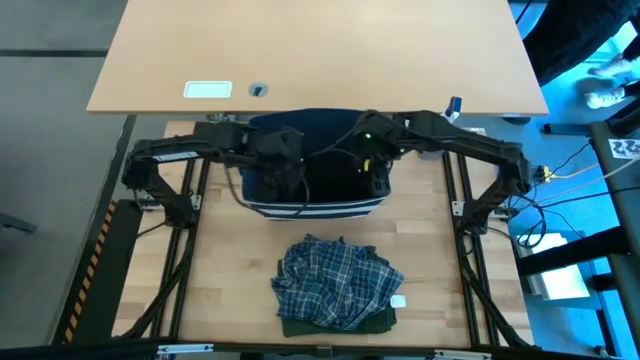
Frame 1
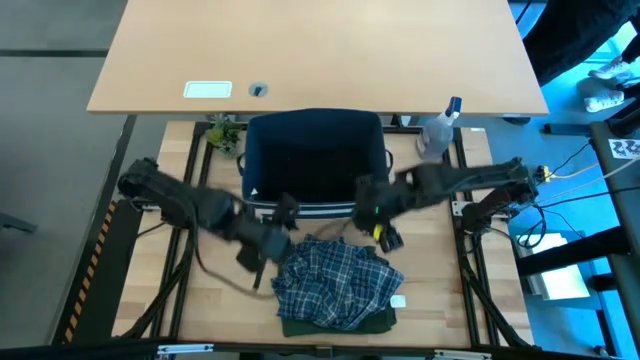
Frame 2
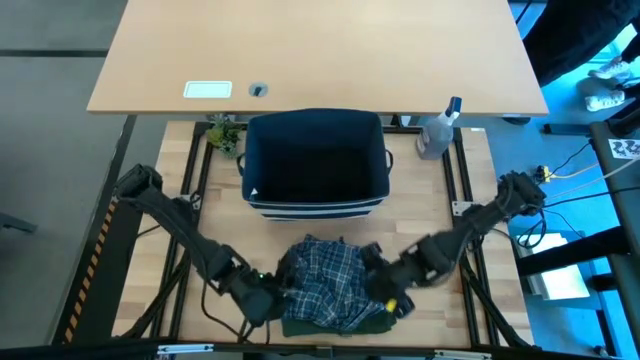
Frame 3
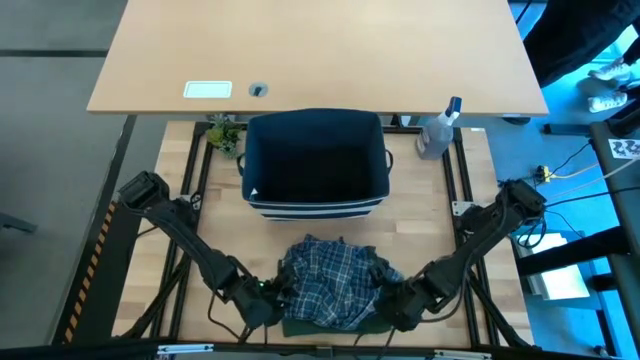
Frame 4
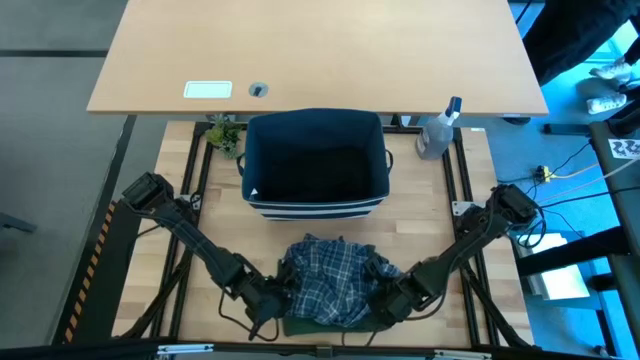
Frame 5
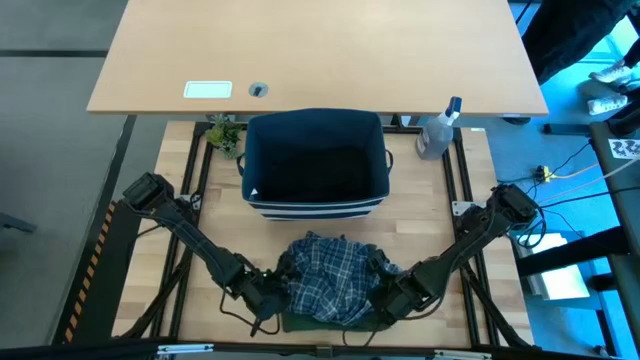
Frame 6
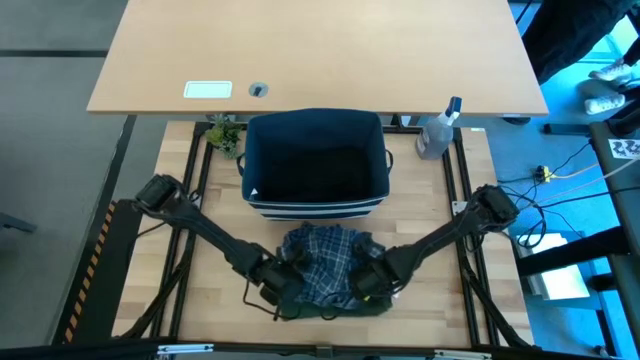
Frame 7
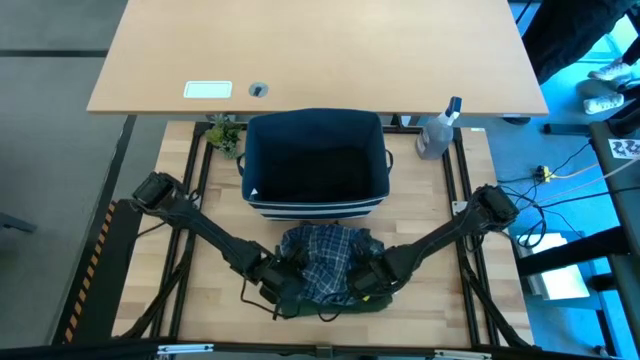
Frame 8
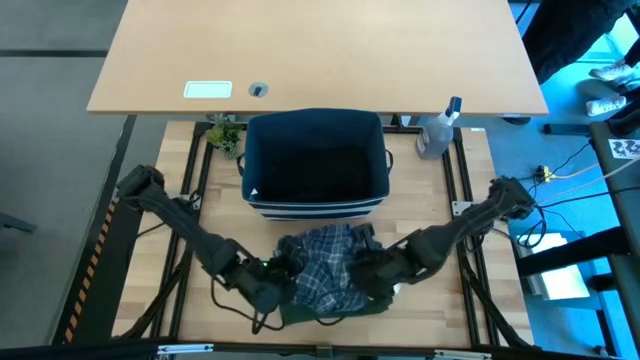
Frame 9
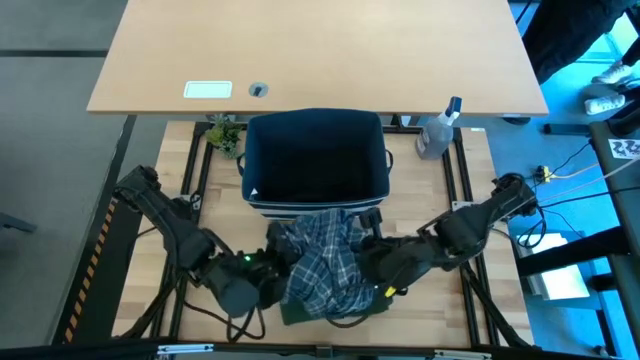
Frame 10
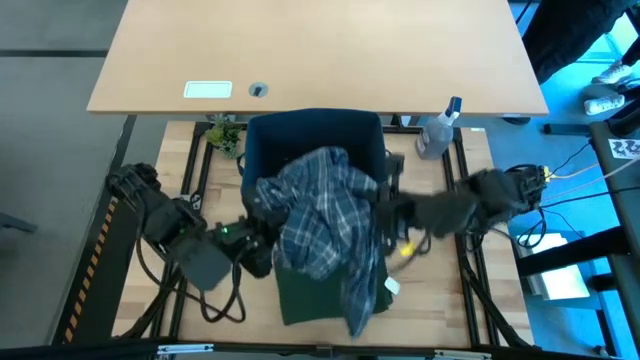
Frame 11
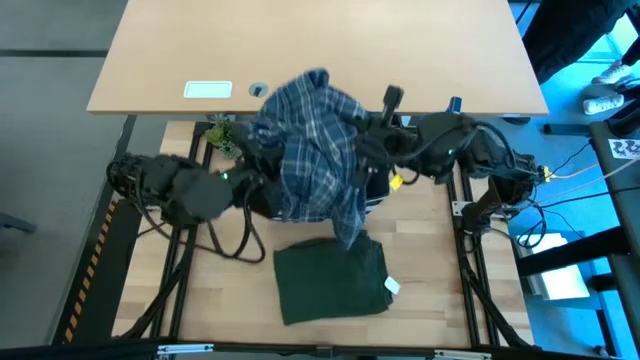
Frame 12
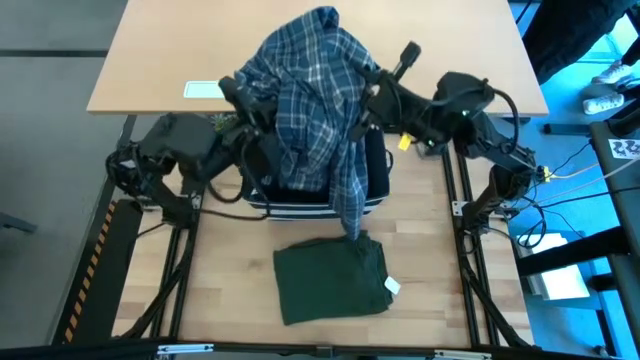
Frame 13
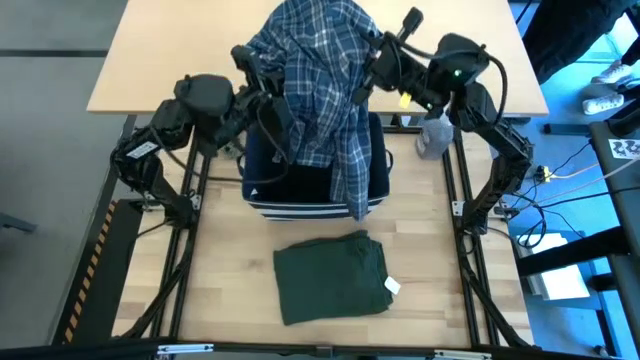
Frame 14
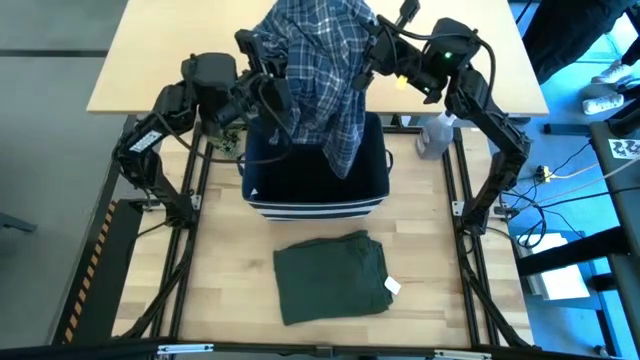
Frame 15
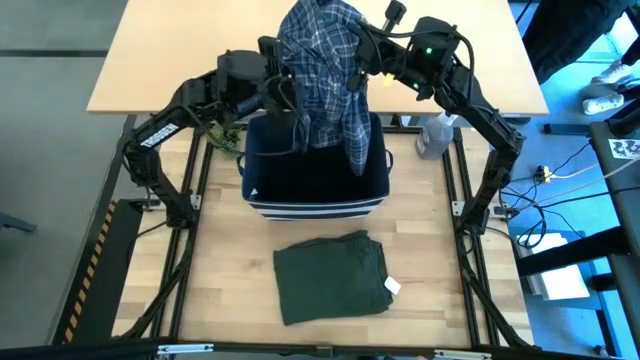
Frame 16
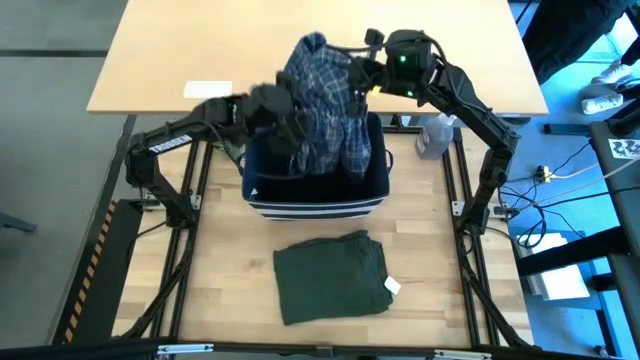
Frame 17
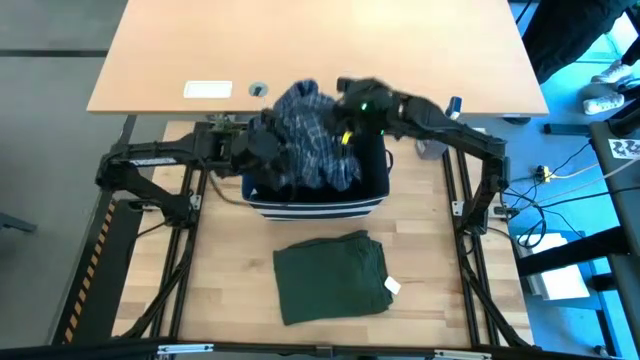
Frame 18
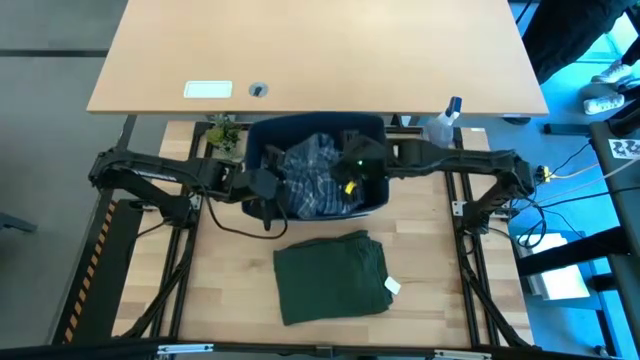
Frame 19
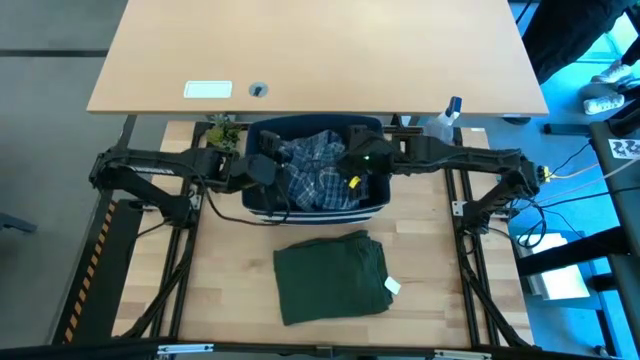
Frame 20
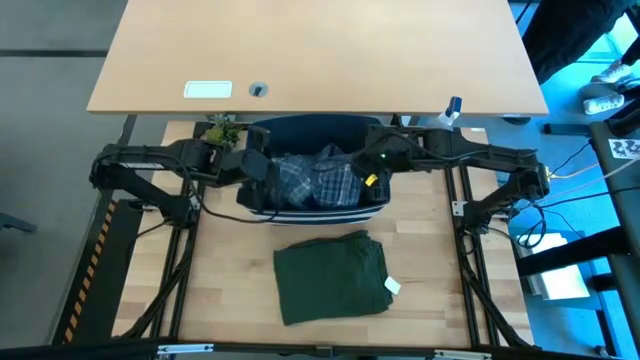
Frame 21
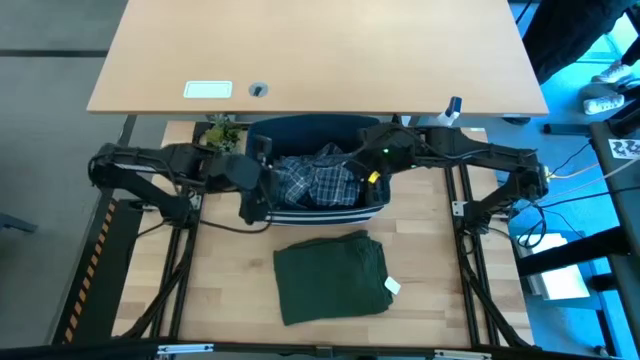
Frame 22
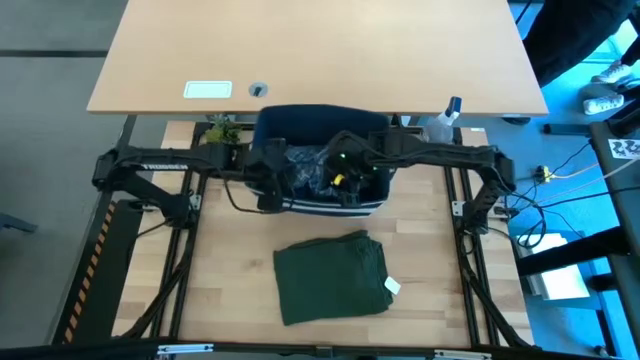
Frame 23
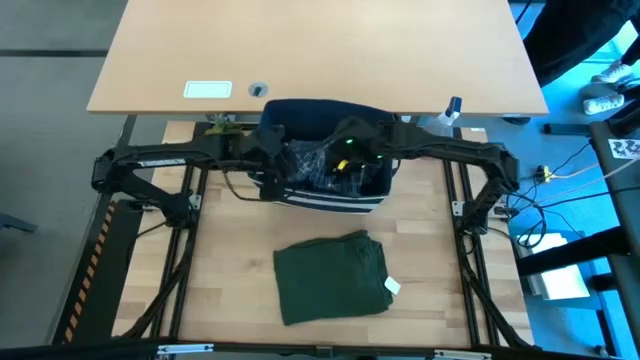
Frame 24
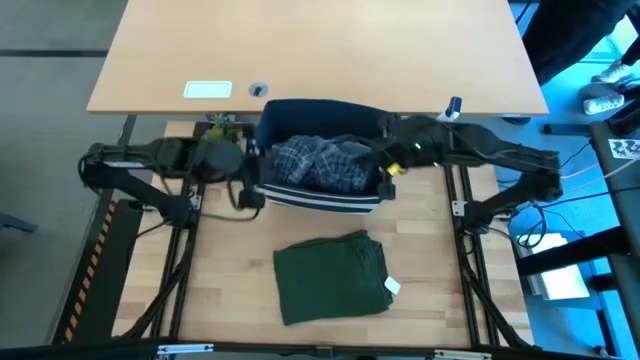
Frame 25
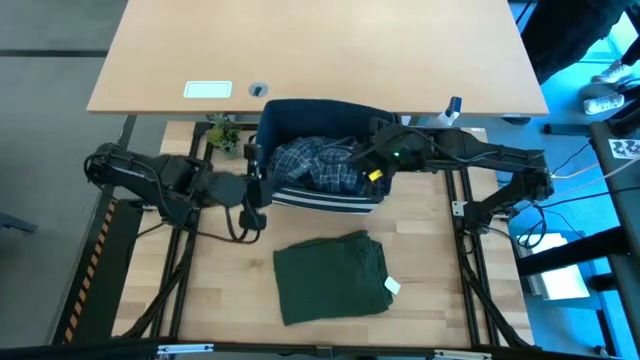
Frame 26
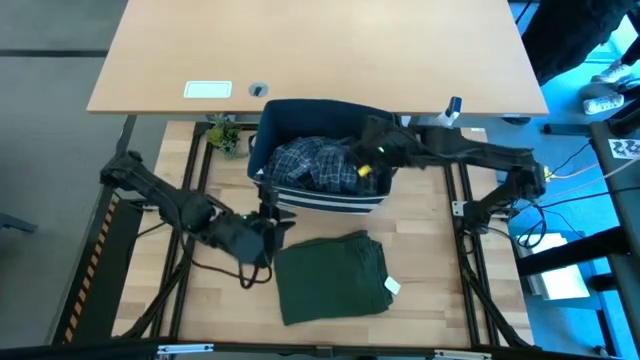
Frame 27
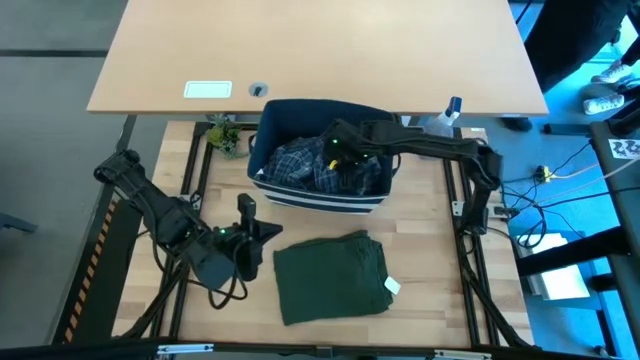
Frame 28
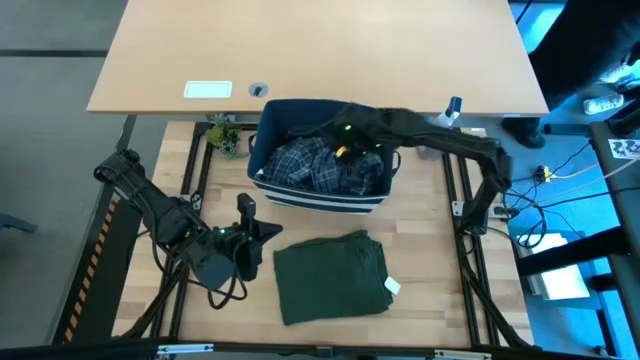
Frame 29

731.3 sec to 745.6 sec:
Task: Fold Laundry from Bin
Put the blue checkered pants into the laundry bin

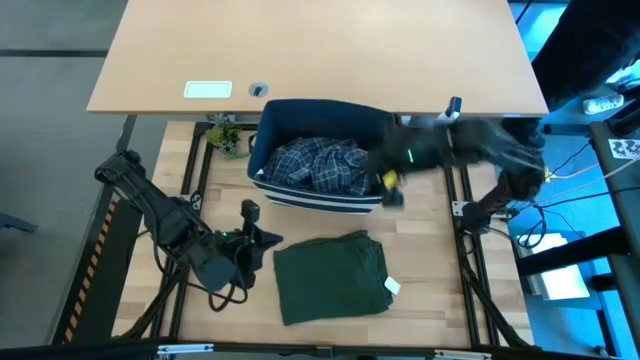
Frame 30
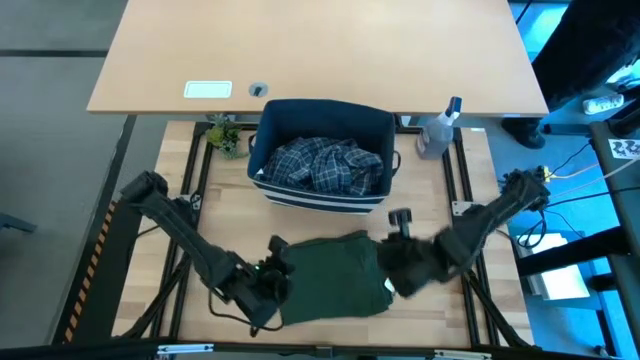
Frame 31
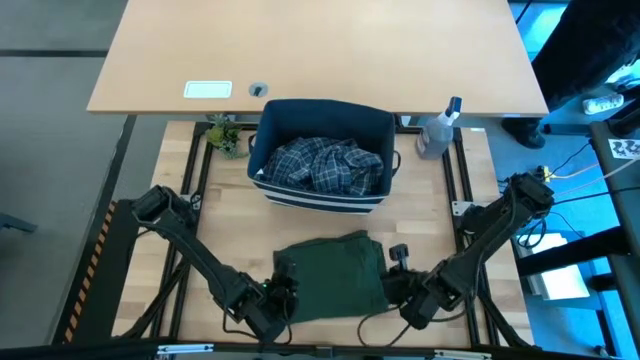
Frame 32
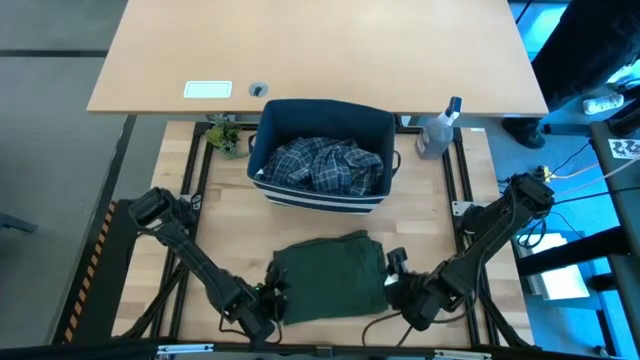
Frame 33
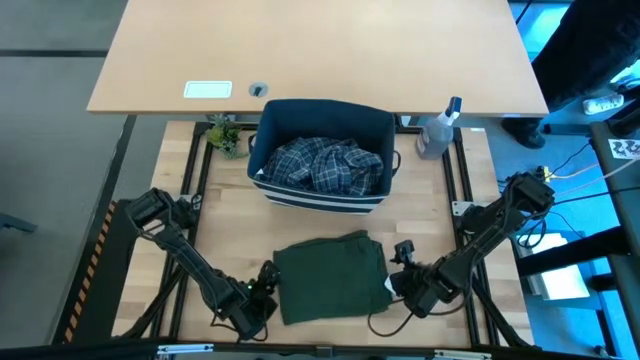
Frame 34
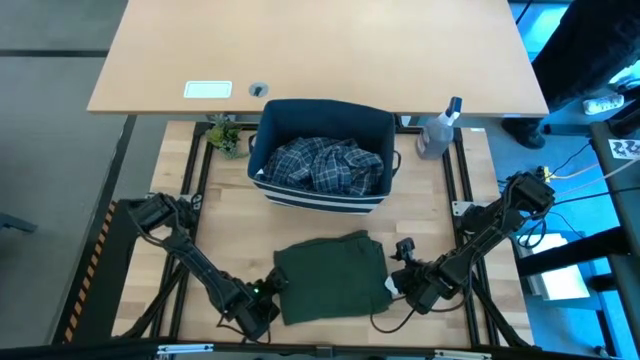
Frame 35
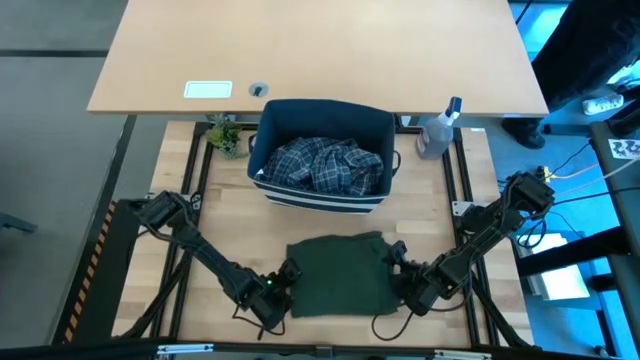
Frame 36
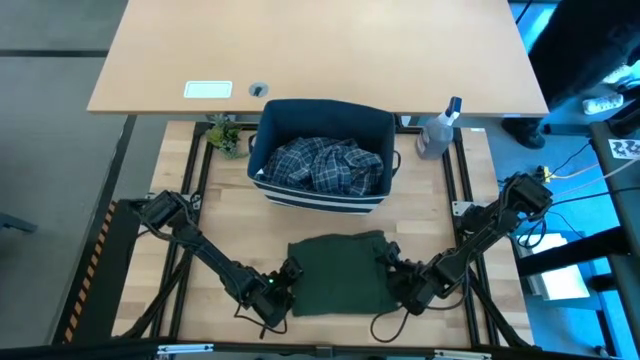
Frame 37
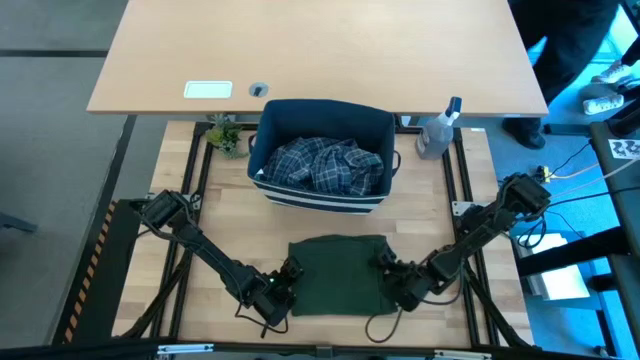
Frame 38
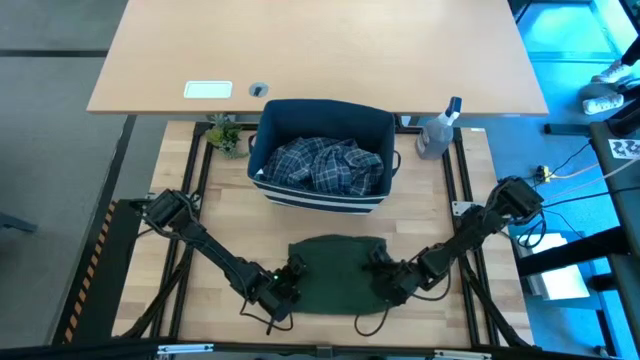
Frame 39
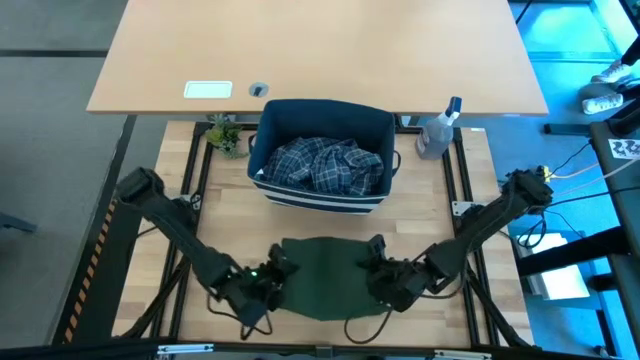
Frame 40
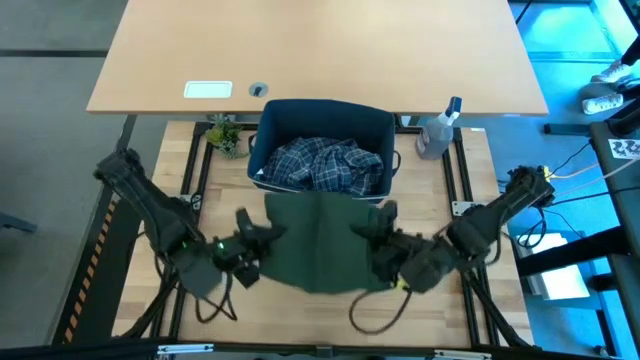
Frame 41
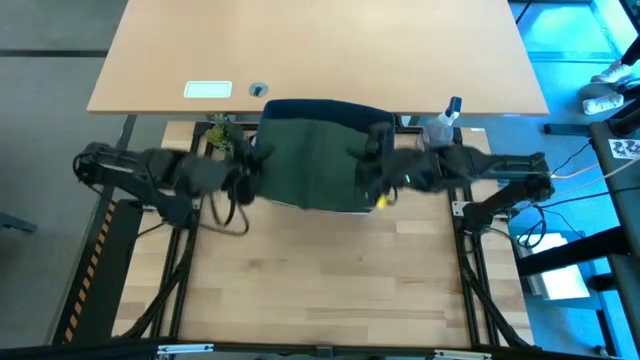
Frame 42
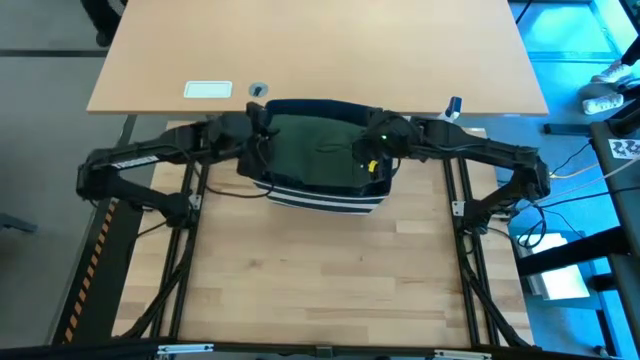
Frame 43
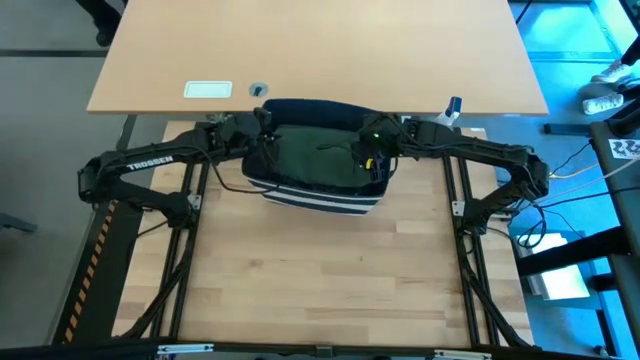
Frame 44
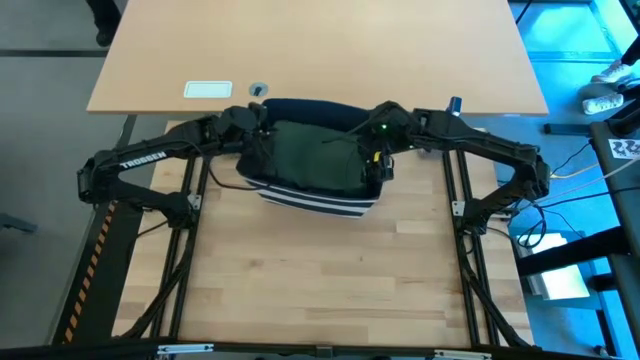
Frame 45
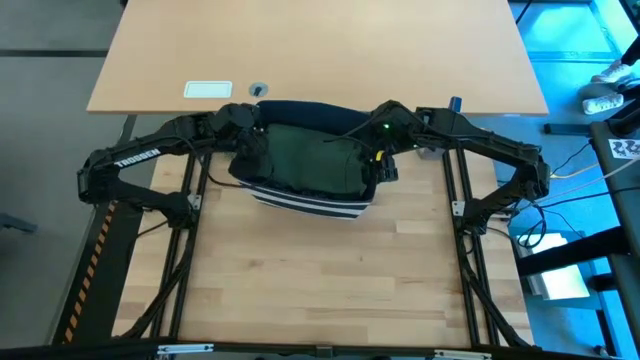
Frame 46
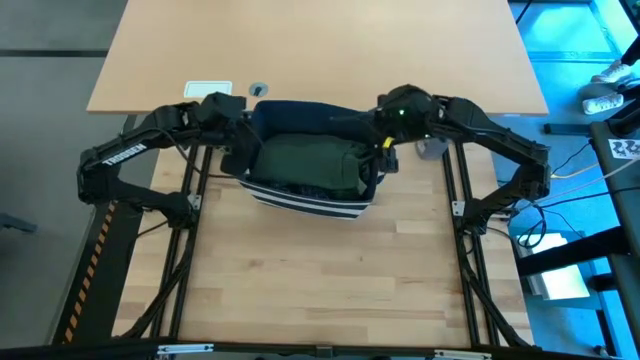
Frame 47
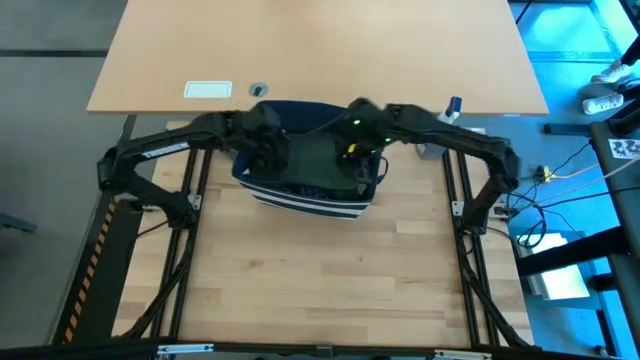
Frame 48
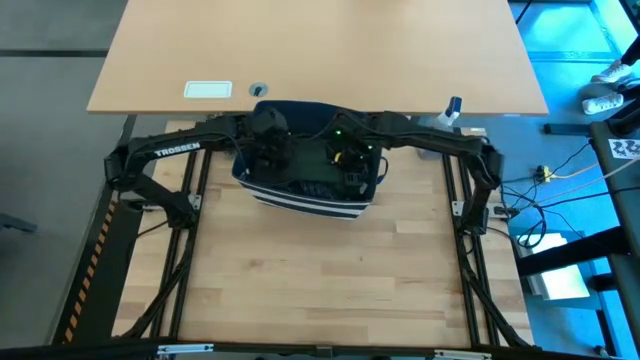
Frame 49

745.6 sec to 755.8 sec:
Put the green polo shirt into the laundry bin
